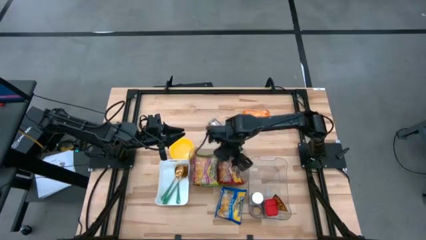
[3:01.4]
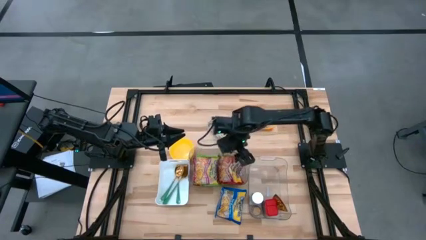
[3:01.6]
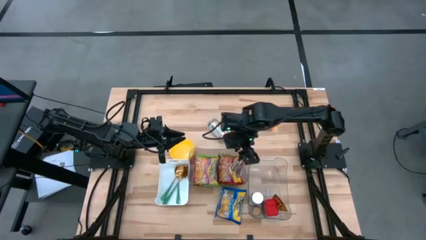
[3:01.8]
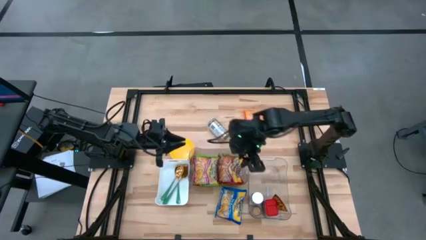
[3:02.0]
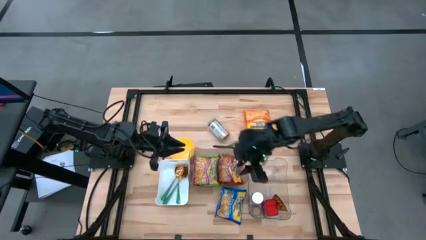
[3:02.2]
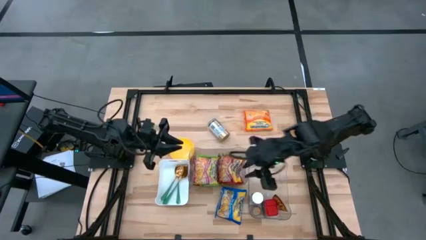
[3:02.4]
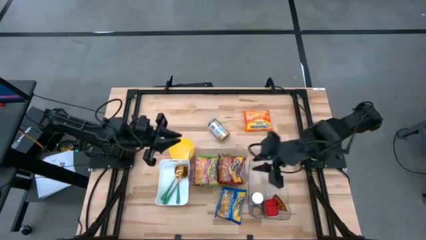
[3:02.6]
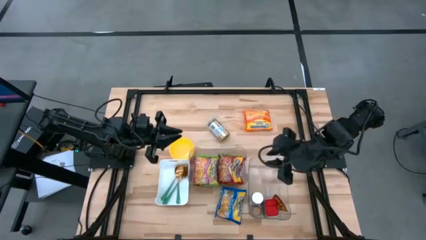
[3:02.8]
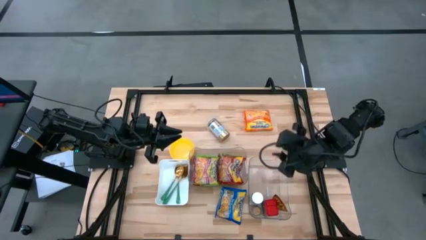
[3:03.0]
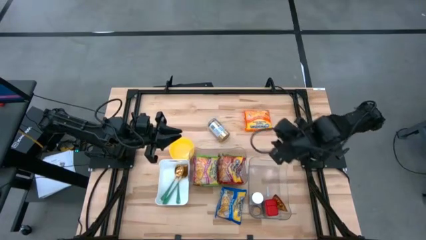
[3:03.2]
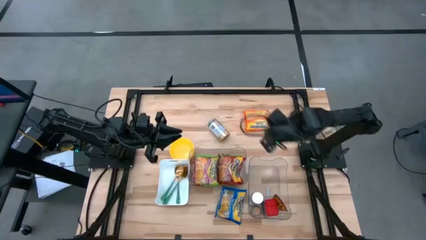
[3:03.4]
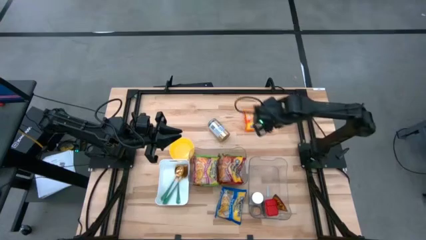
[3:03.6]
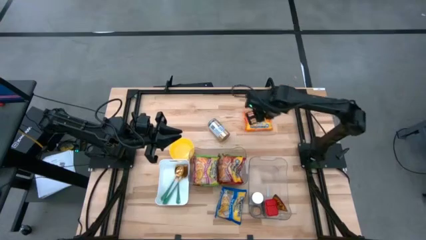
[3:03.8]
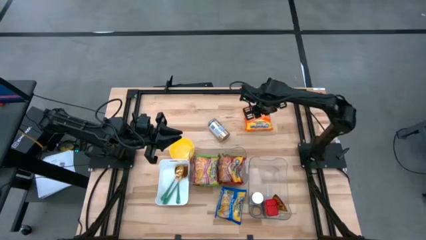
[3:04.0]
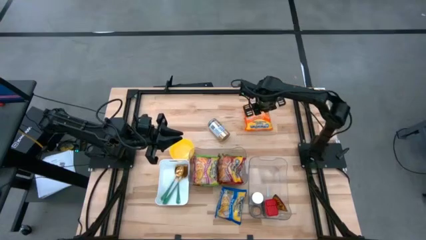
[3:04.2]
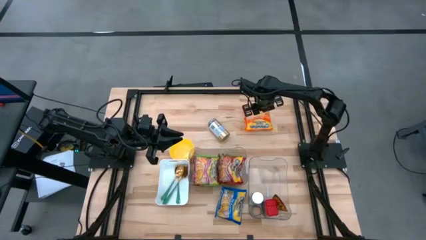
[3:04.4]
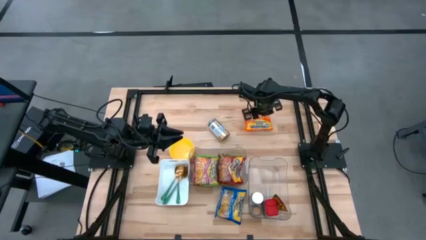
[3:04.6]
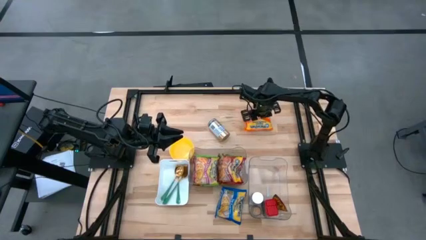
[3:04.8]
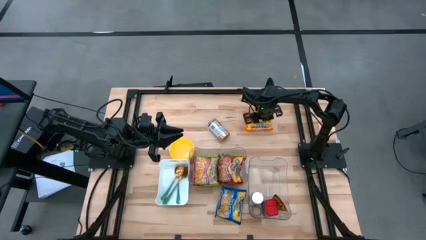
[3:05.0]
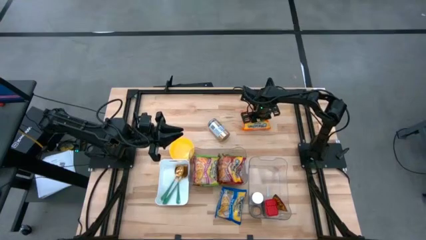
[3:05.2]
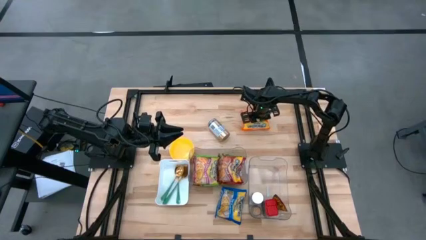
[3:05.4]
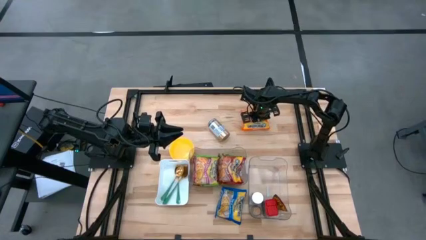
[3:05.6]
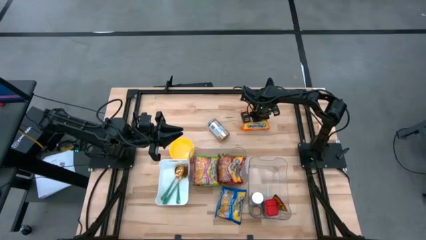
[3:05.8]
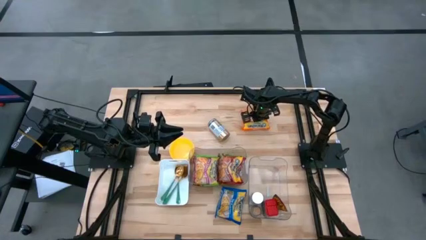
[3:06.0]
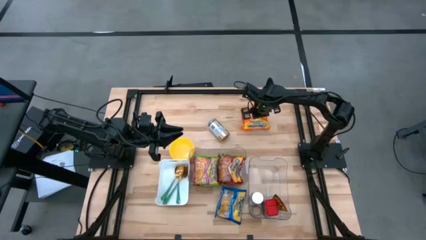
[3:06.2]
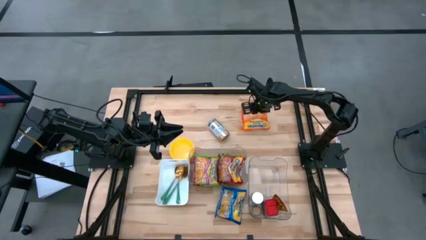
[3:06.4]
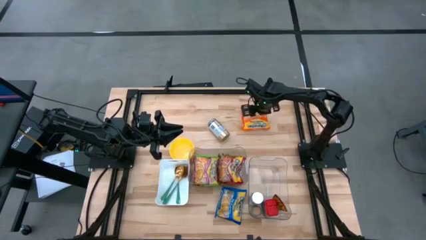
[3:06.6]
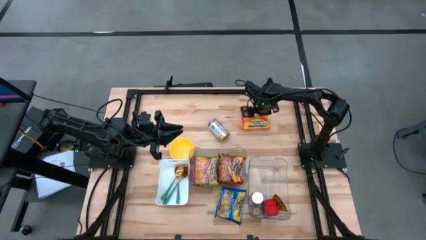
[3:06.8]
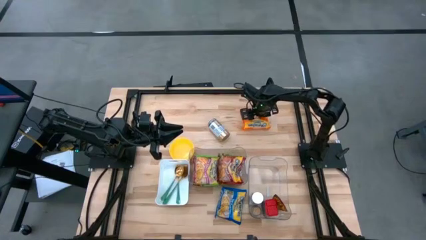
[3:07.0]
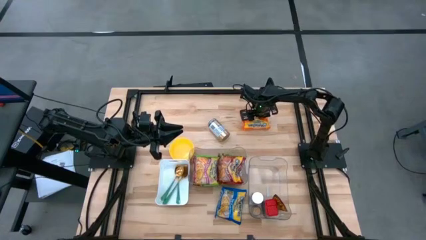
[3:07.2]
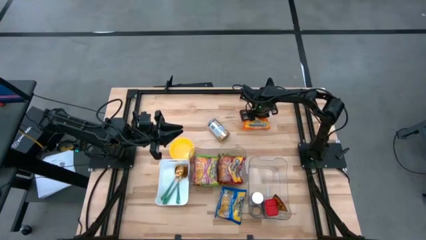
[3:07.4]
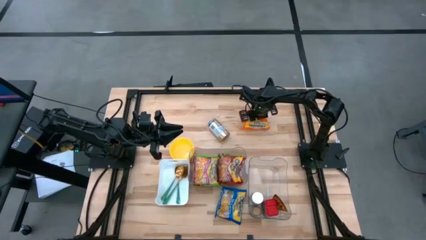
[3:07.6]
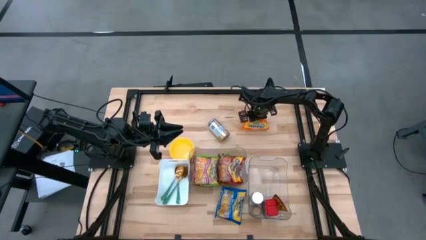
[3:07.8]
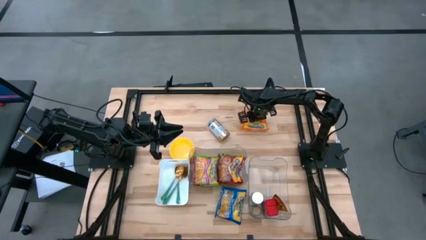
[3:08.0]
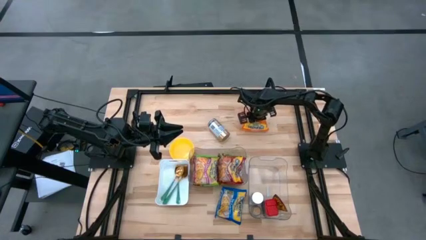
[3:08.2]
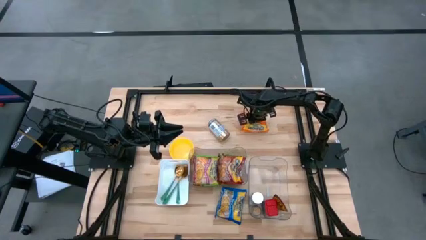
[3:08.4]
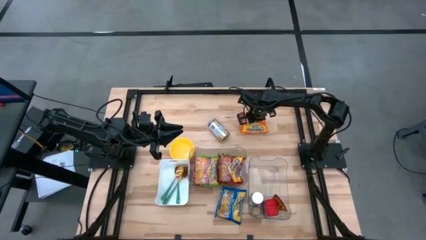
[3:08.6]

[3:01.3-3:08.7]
Task: Pick & Place Food Item
Put the orange noodle pack into the left transparent bin

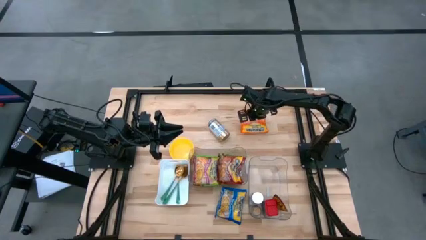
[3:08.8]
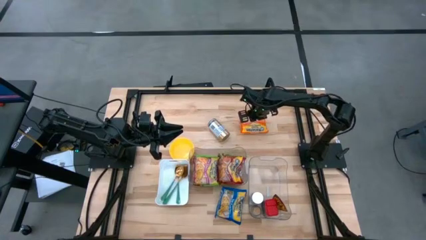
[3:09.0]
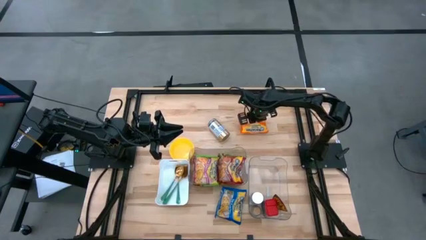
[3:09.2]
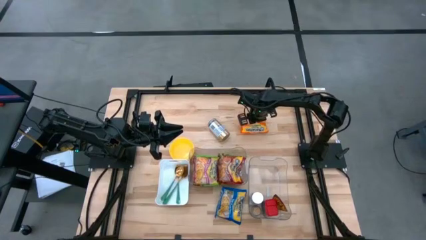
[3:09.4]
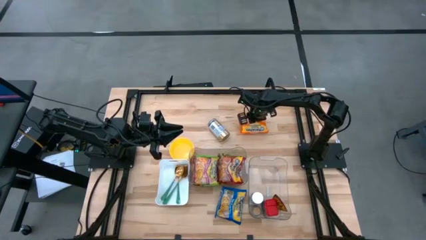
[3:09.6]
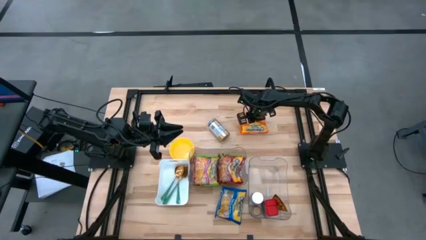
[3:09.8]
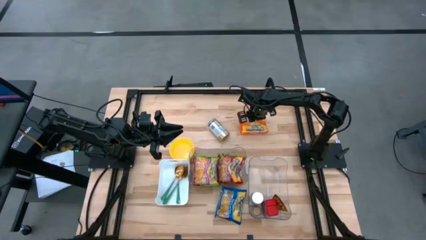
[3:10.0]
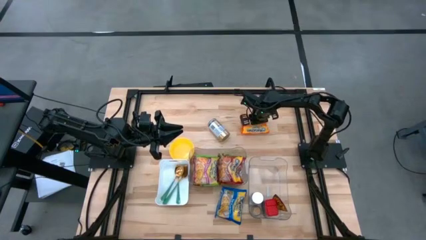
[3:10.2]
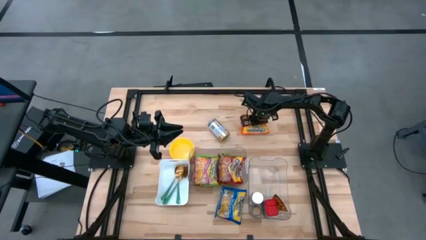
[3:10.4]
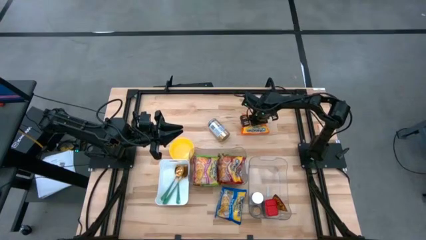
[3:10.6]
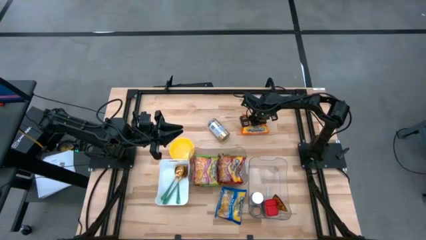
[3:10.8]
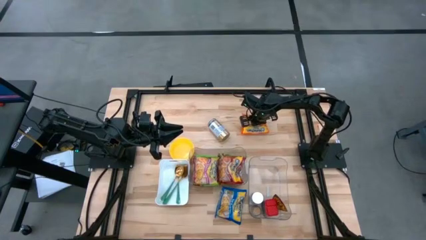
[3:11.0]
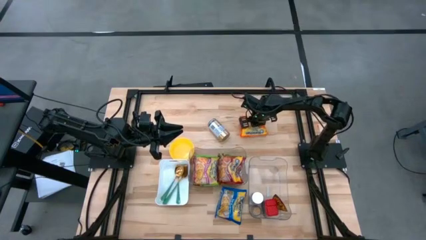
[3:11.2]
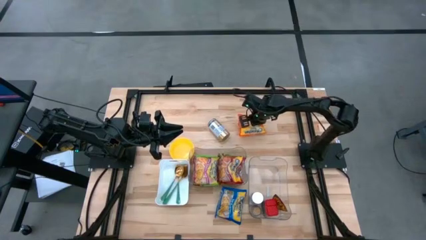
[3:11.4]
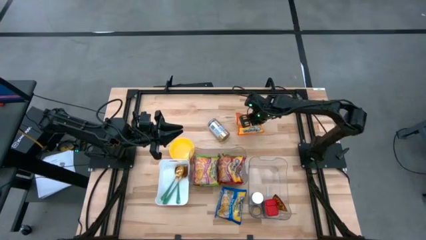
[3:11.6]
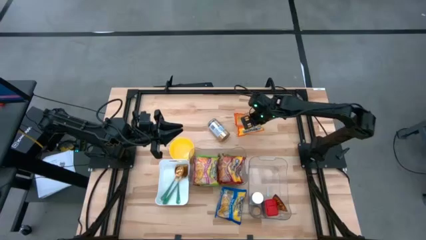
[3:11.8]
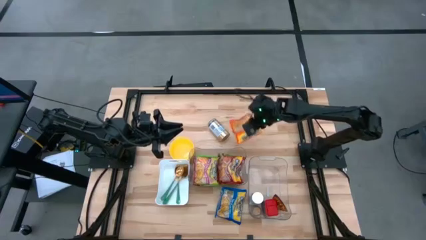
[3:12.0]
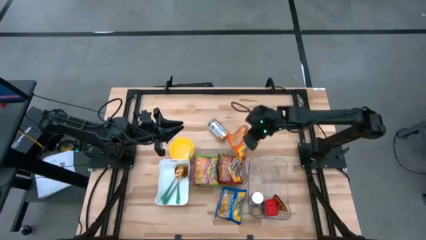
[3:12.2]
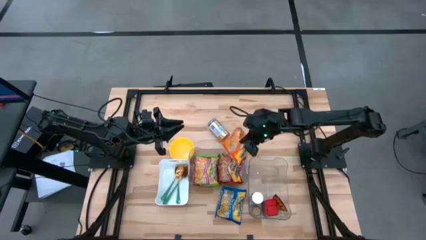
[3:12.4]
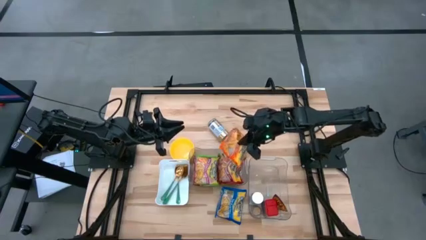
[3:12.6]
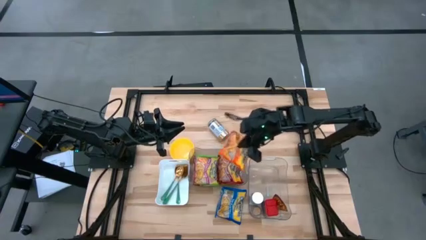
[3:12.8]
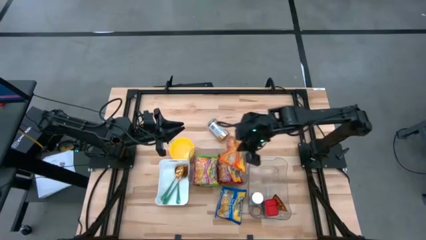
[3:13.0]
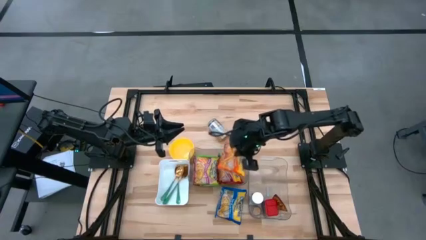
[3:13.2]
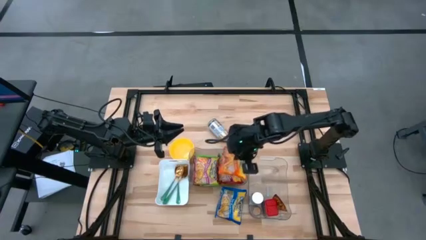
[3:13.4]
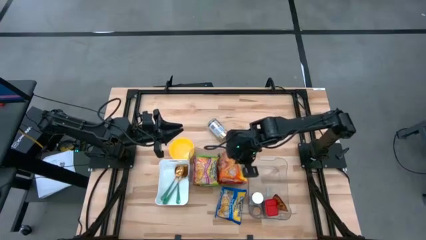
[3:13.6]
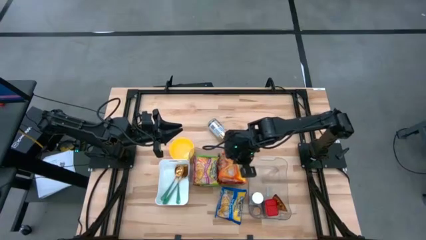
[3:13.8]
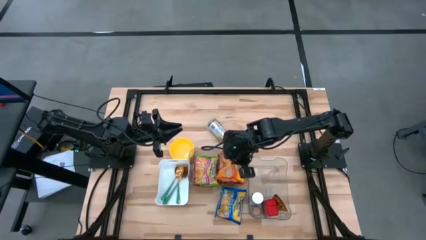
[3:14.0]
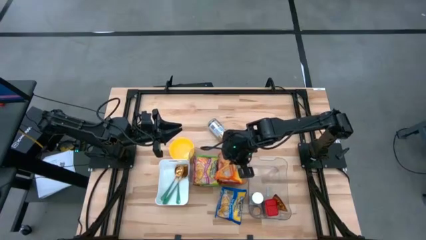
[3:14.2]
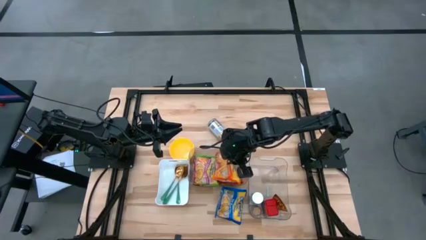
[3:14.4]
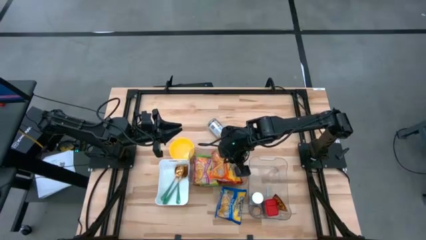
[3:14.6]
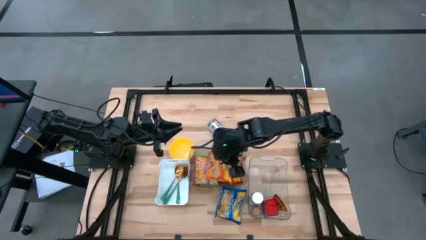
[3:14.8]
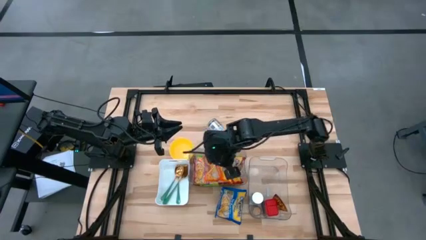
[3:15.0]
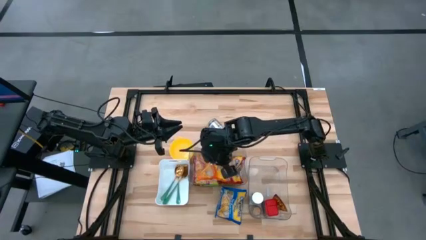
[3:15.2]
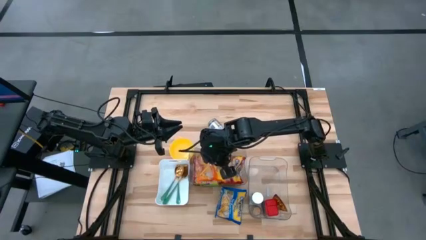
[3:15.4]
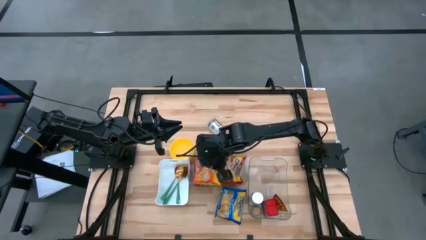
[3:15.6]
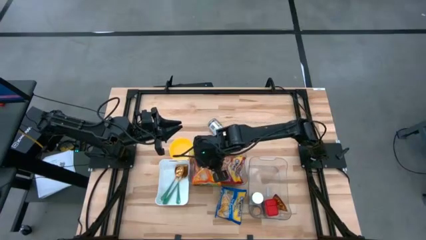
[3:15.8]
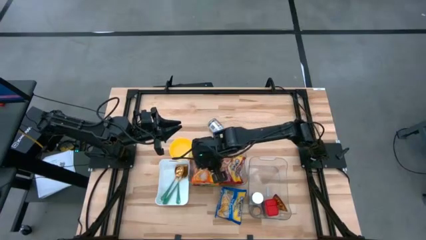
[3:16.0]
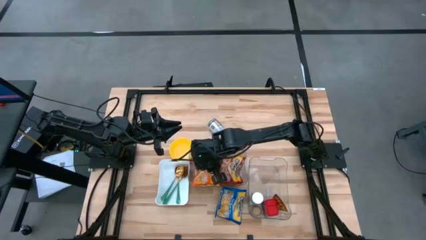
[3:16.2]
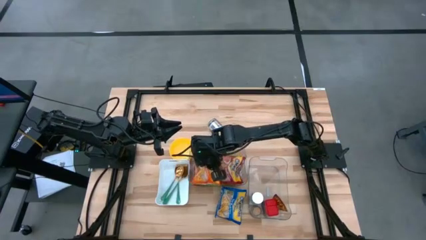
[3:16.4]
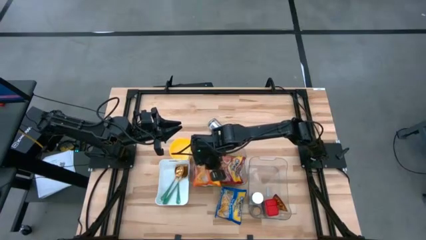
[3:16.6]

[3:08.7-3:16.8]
Put the orange noodle pack into the left transparent bin

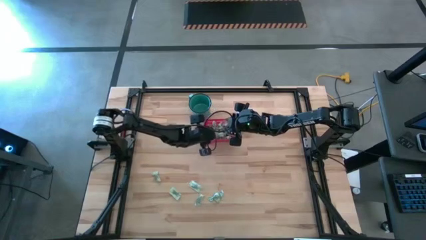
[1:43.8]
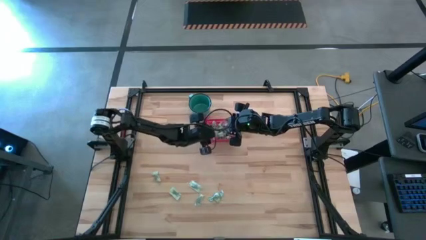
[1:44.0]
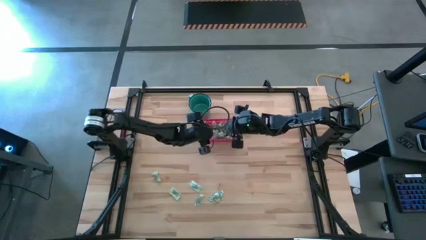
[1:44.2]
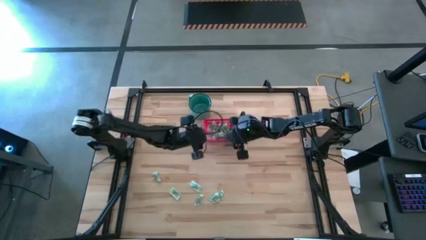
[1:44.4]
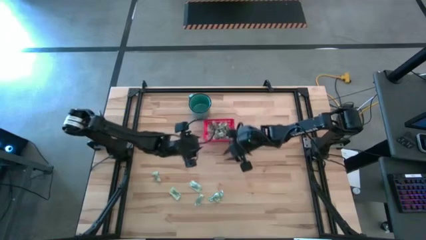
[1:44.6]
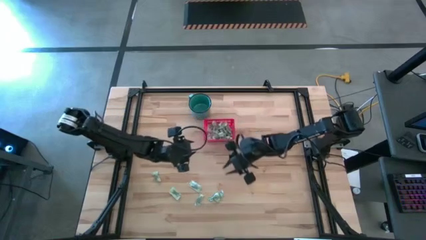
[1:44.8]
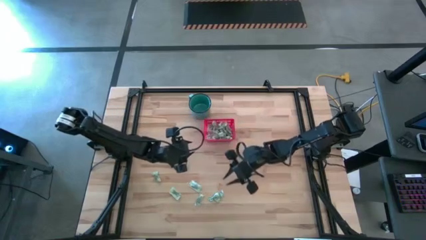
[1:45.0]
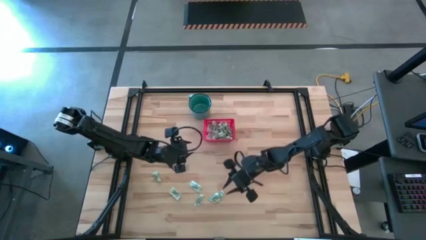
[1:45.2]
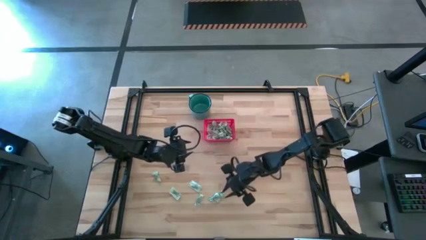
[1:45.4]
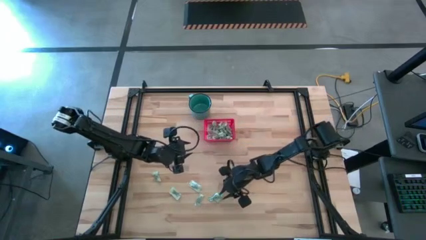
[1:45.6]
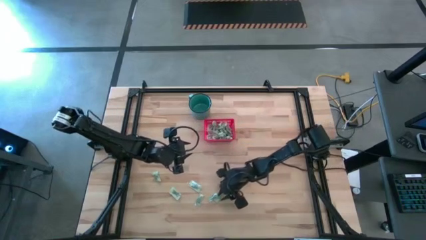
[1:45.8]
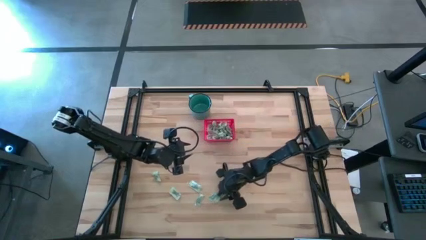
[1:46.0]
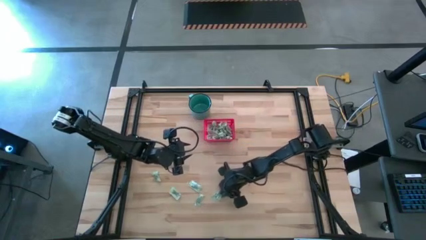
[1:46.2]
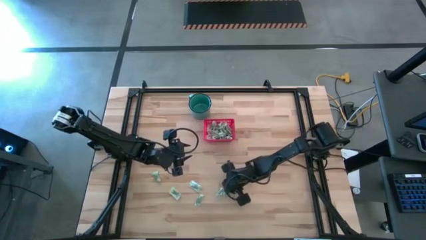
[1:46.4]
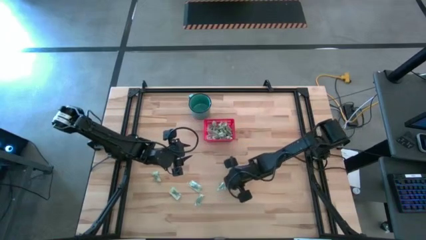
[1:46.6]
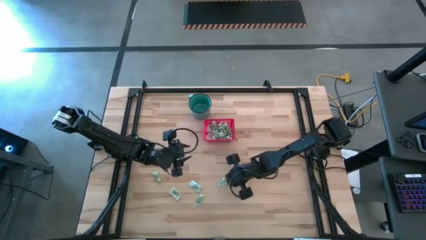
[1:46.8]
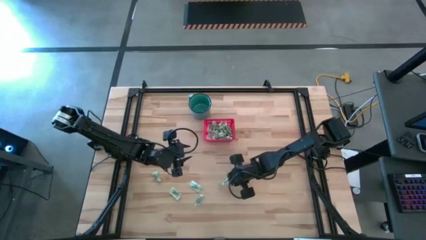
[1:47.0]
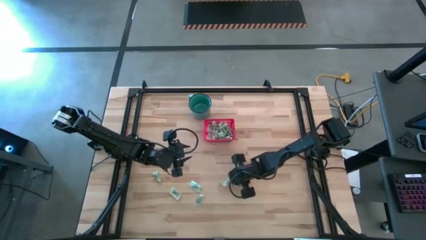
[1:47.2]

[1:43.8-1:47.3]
Task: Pick and place items into bin
Put the light green stevia packet into the red bin
